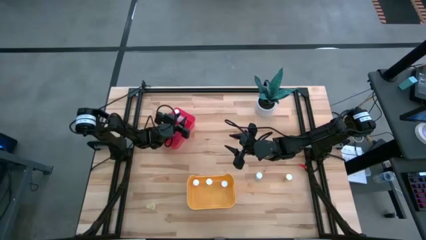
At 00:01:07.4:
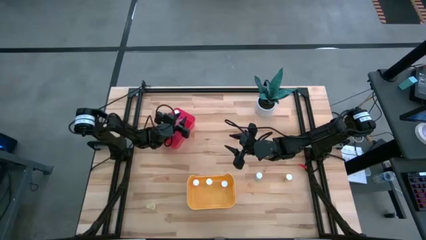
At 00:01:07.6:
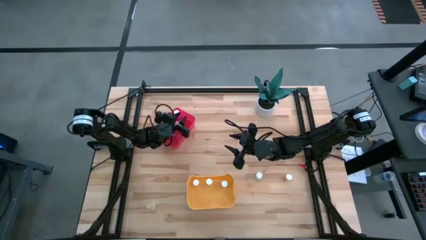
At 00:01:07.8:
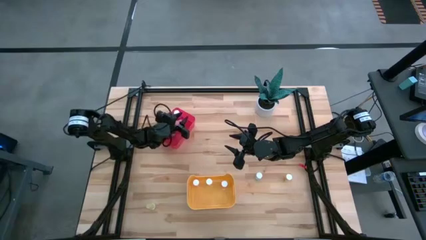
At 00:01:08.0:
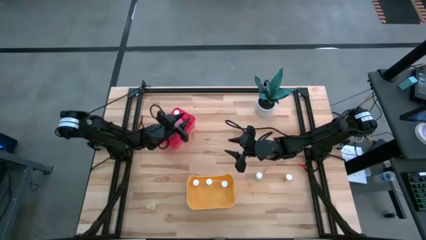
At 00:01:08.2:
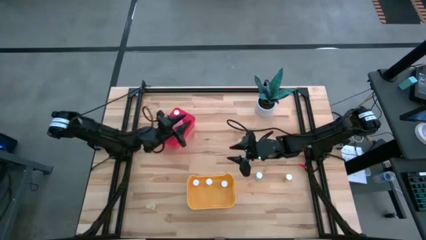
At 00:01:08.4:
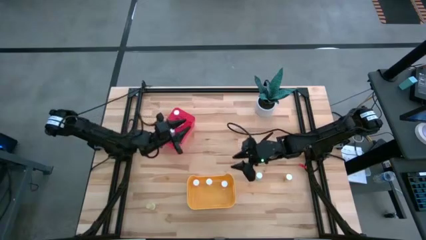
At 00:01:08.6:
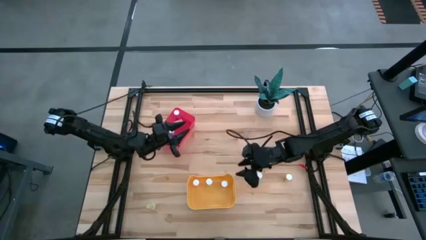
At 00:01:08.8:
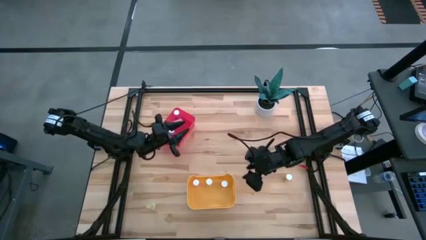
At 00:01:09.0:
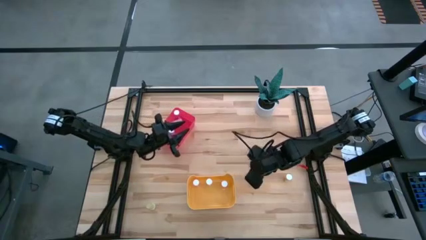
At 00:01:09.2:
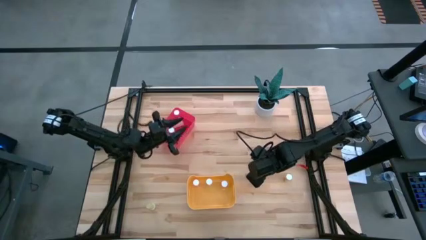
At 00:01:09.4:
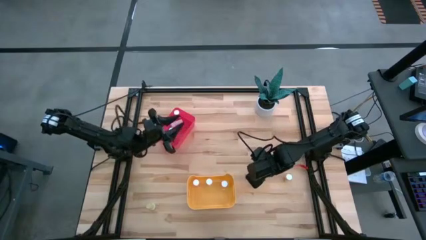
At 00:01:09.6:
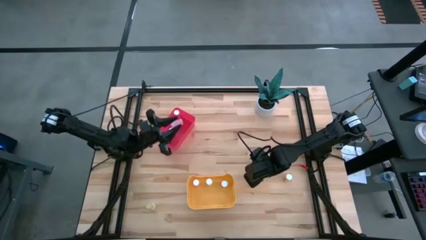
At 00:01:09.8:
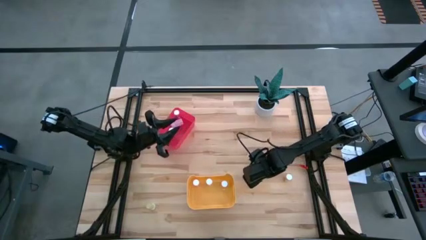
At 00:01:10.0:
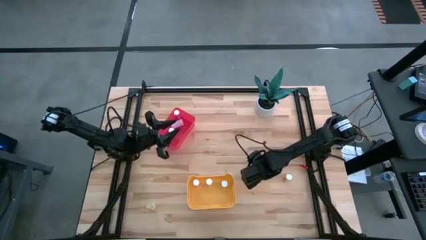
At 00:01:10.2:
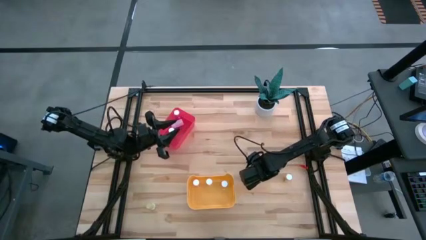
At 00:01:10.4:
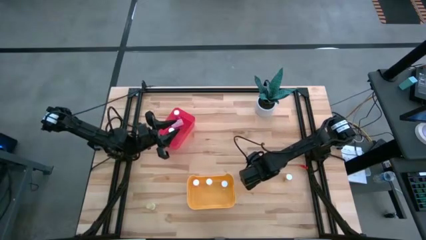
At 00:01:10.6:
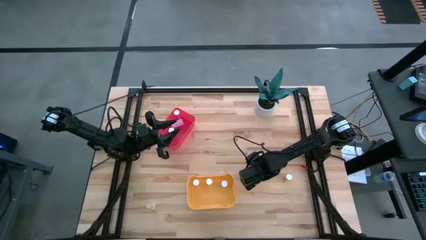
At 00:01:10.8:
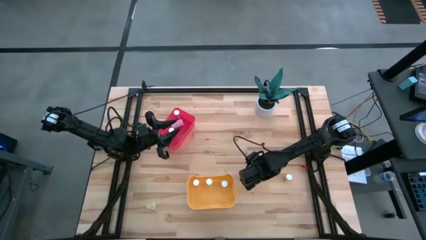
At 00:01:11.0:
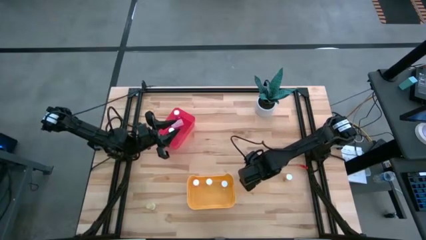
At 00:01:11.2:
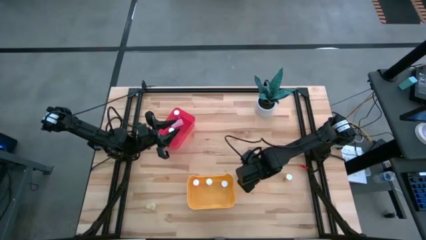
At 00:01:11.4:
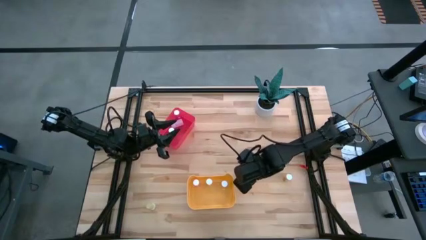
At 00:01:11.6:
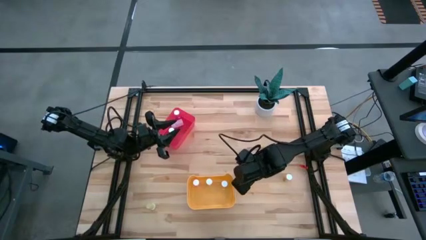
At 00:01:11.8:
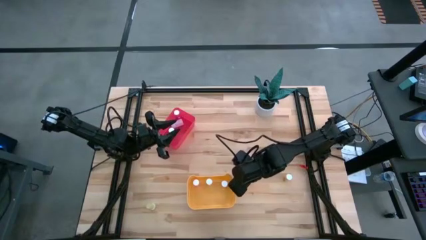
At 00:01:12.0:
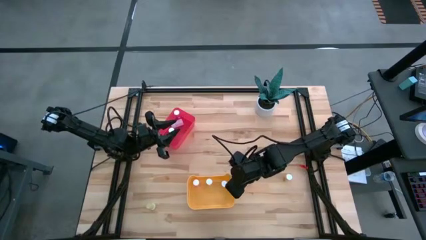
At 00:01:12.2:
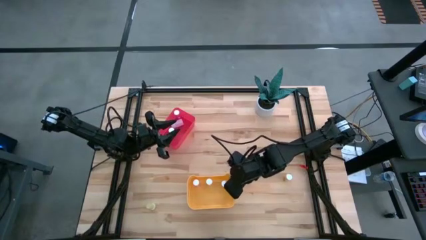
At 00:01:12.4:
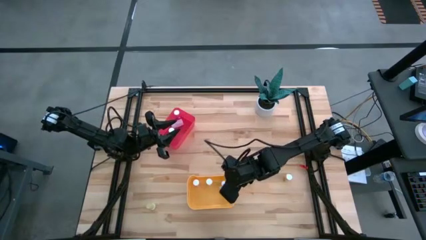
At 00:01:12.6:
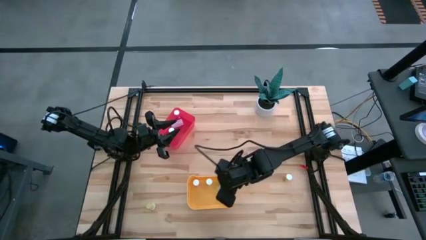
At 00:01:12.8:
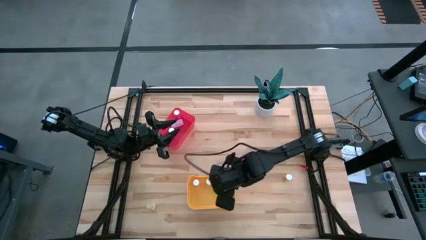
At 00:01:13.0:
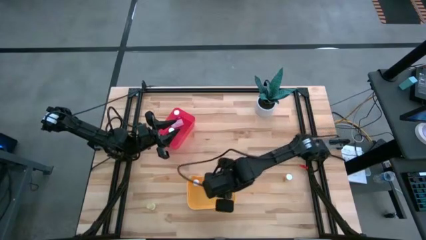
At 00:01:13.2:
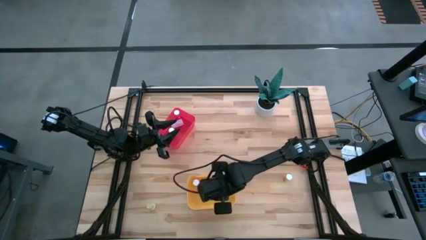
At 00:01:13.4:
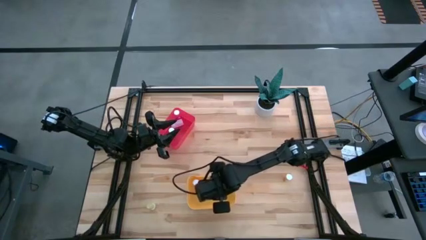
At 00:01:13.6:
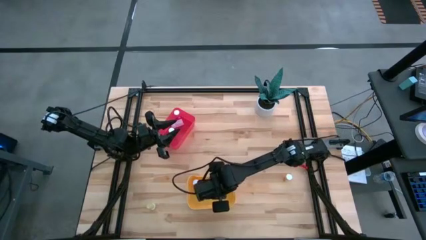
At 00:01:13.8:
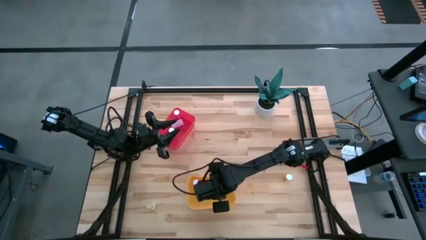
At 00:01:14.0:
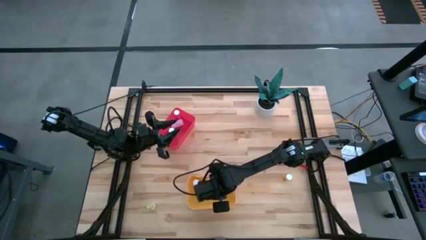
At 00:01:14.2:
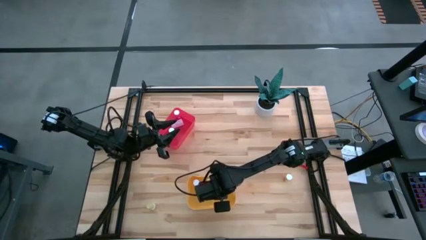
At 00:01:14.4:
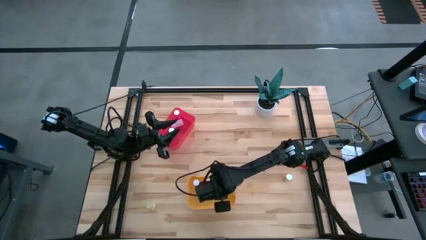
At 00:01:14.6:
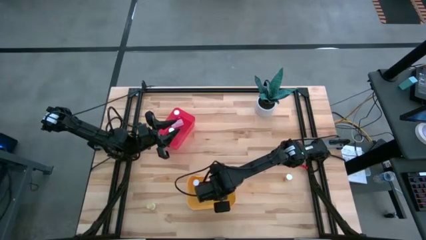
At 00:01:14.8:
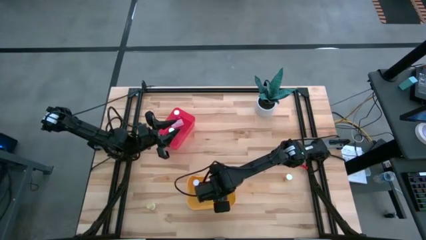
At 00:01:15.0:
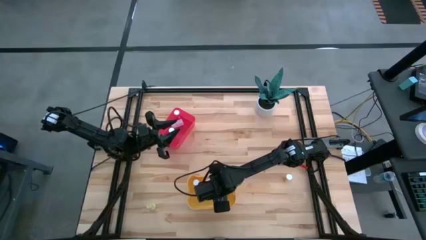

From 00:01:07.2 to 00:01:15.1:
Task: Pick and place medicine bottles into bin by pill shape (circle, oval)
Put the green tablet bottle into the yellow bin

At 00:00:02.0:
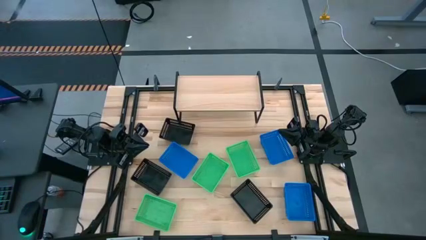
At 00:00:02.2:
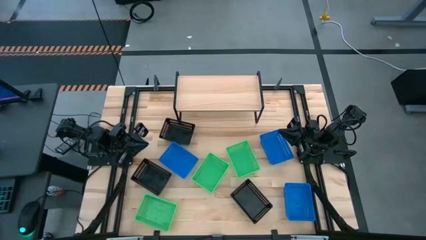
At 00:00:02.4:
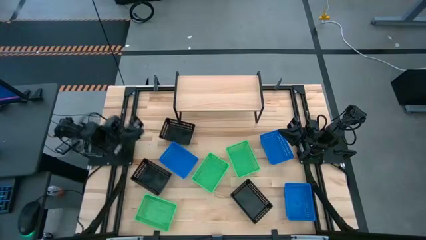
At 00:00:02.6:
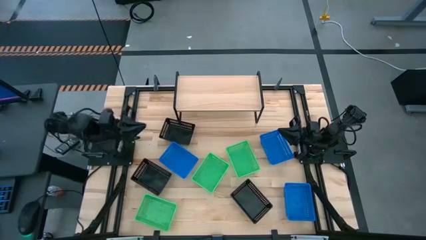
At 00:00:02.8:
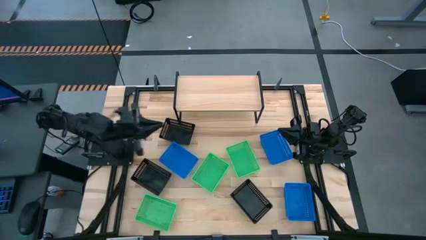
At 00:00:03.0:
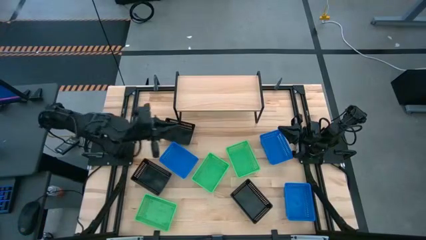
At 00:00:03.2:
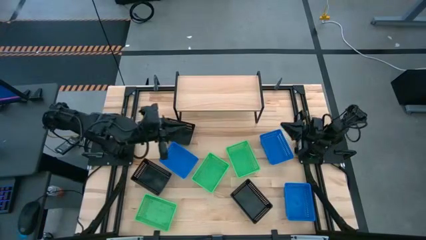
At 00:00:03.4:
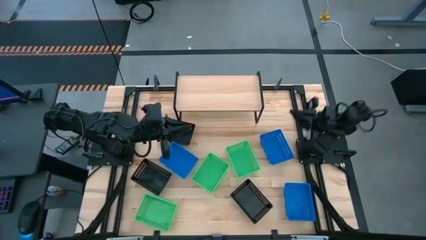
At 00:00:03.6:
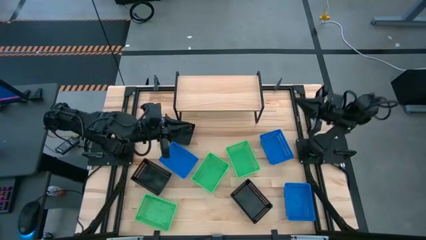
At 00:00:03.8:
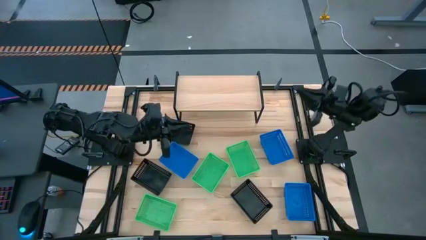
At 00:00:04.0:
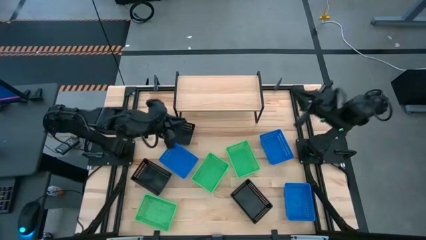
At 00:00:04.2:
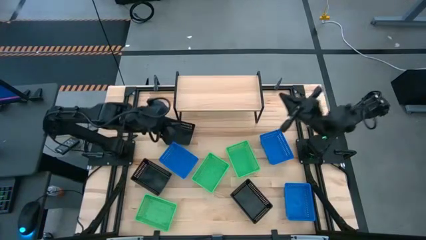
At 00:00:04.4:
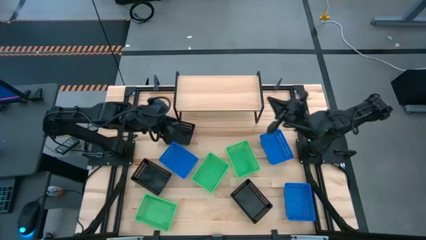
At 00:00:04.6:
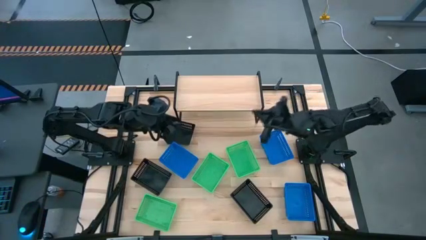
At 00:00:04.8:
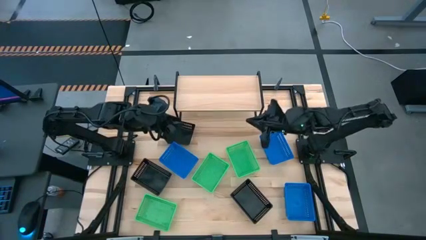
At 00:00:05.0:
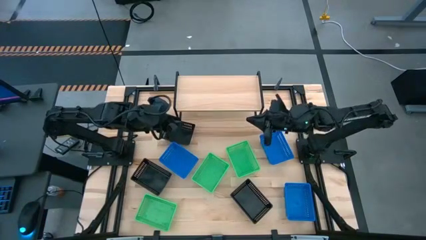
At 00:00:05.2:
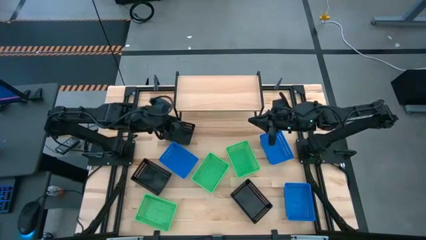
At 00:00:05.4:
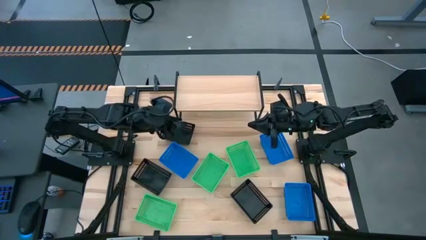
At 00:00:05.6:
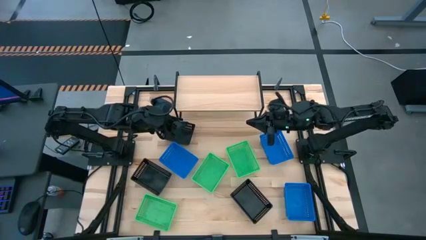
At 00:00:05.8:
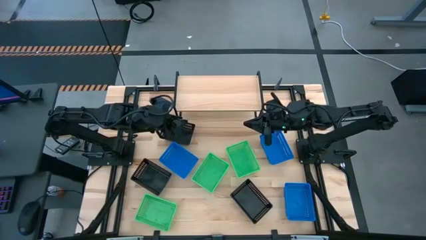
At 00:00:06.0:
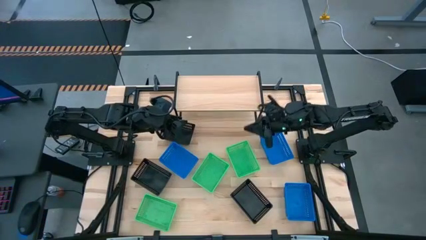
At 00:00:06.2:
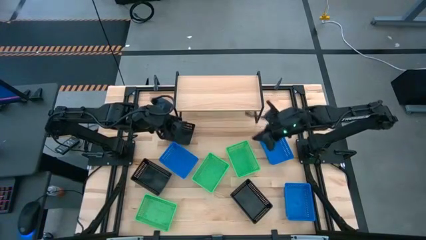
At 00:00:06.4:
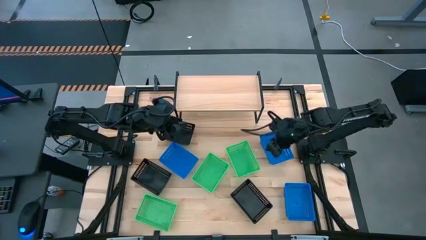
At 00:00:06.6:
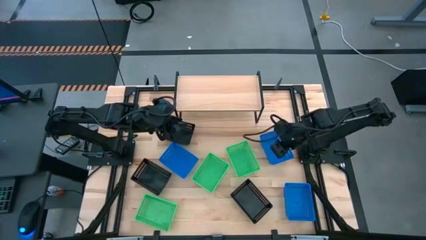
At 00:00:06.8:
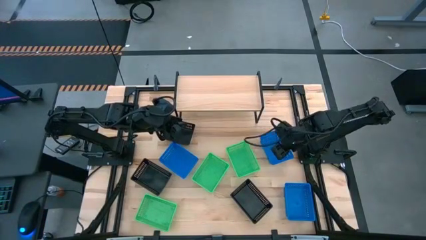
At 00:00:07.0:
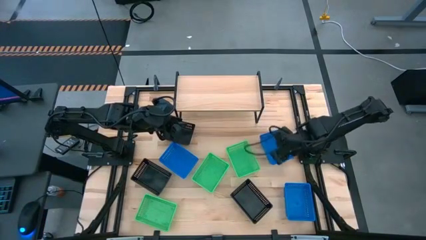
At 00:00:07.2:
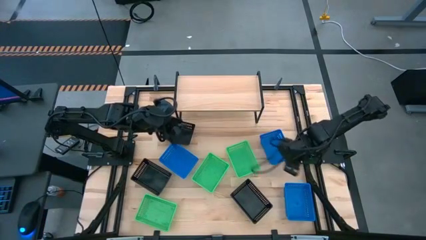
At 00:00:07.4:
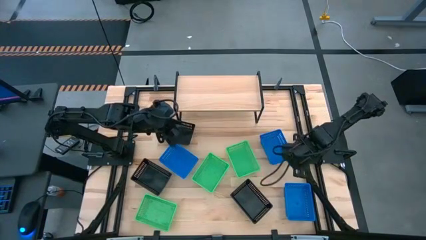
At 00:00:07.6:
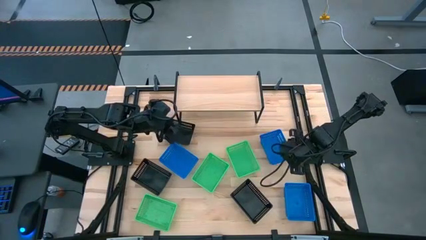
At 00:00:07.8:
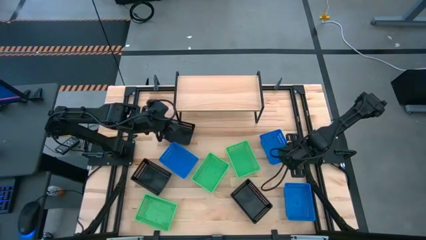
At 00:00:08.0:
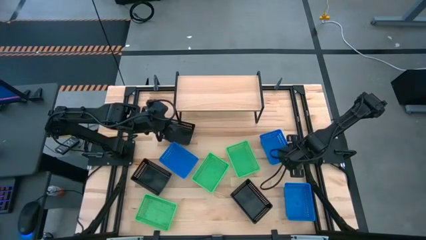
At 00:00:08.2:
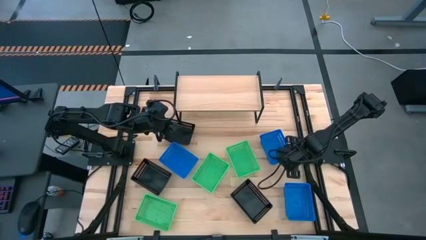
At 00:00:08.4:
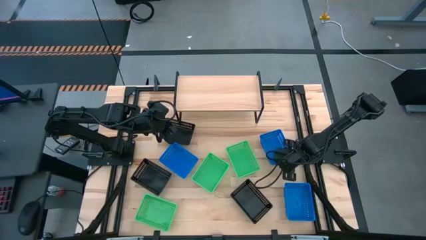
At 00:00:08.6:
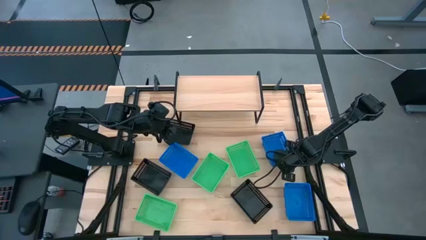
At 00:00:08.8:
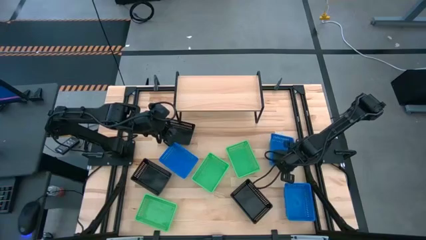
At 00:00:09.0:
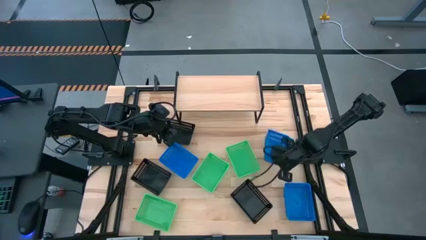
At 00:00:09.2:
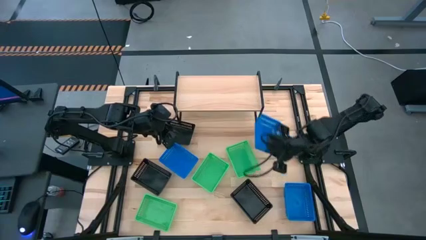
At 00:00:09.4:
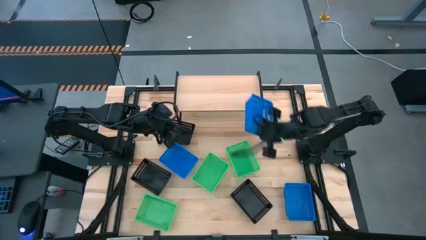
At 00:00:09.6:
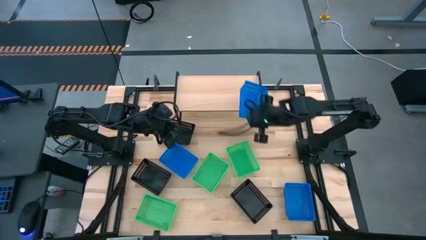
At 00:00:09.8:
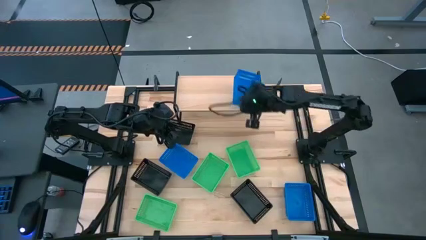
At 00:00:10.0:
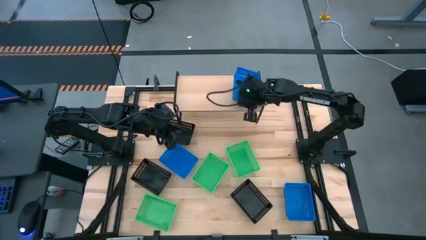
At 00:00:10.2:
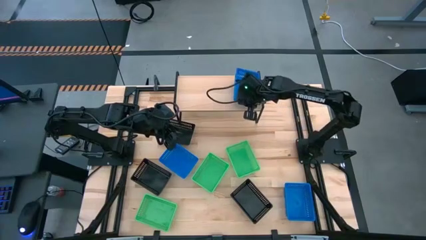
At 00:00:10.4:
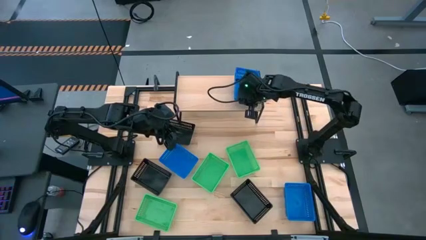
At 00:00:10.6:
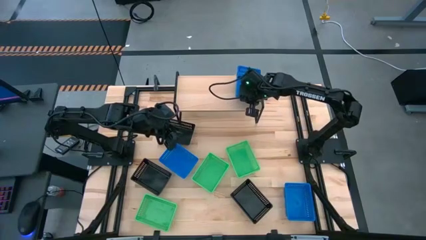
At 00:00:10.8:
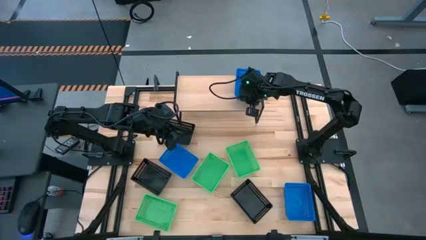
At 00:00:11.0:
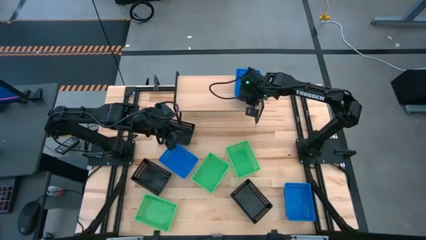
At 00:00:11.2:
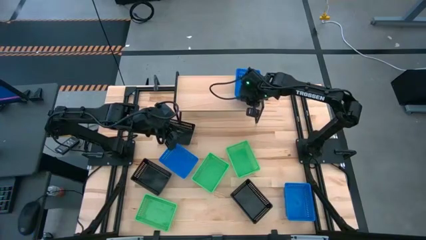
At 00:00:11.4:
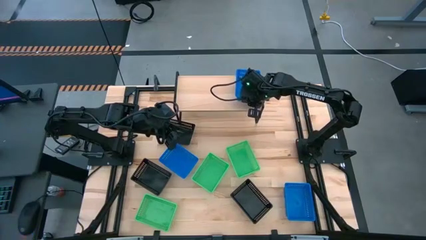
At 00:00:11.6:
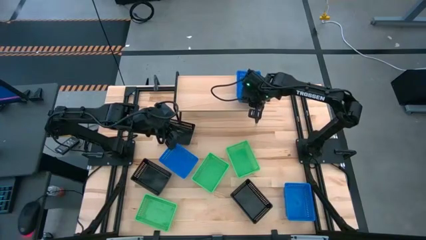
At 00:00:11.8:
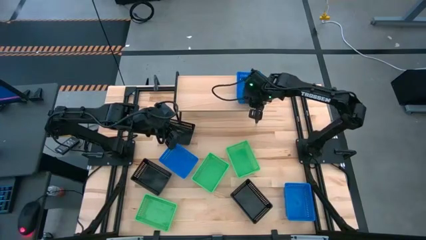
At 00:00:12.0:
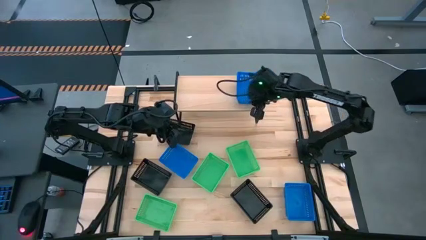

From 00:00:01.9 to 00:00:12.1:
Task: Stack baskets on shelf by color
Put the top right blue basket on the shelf
